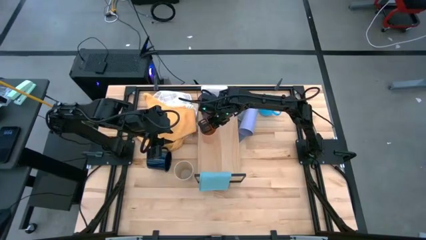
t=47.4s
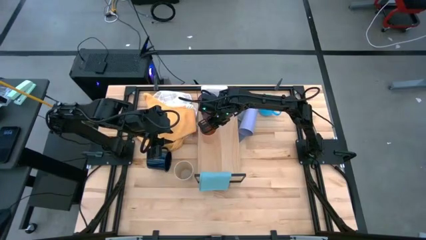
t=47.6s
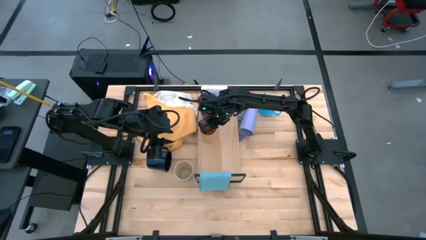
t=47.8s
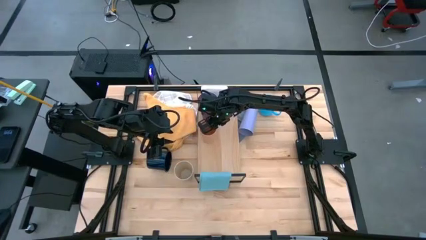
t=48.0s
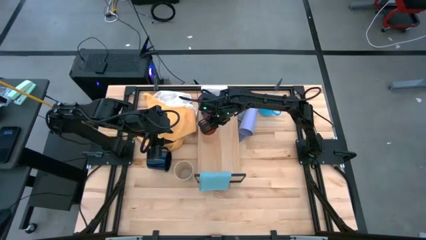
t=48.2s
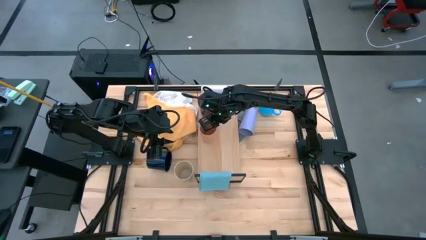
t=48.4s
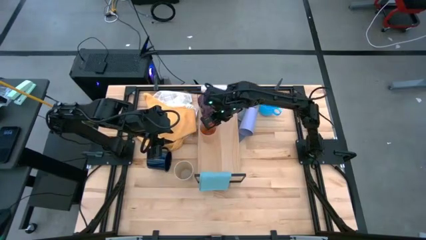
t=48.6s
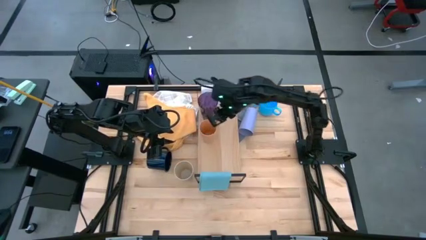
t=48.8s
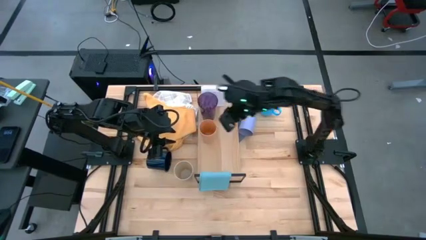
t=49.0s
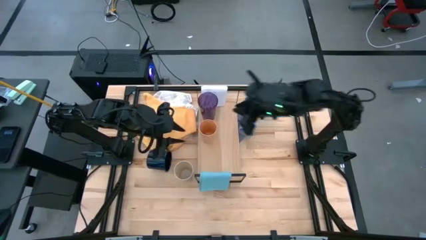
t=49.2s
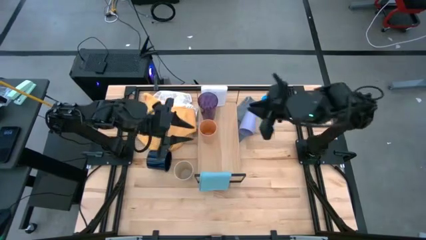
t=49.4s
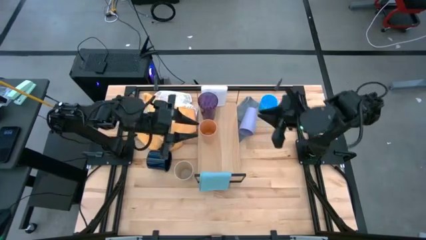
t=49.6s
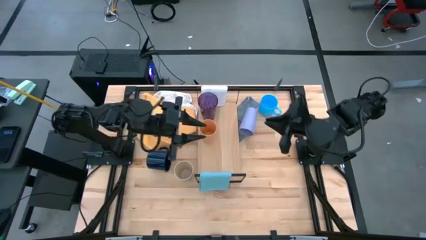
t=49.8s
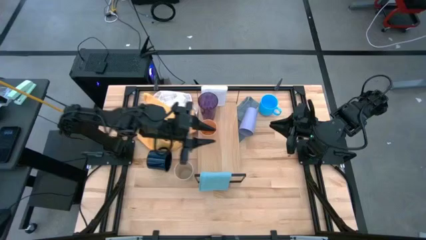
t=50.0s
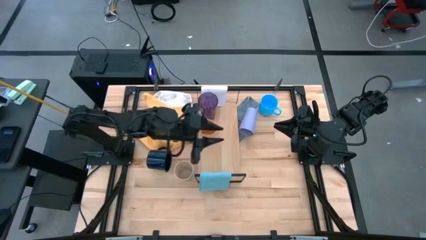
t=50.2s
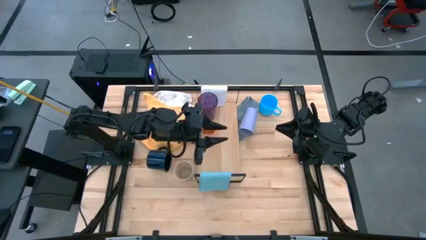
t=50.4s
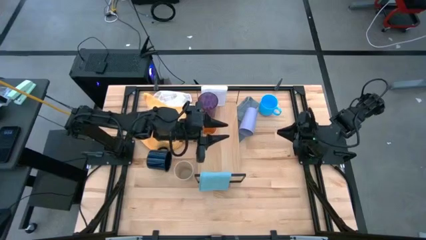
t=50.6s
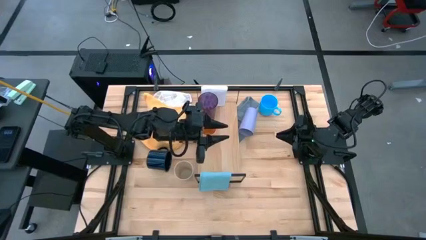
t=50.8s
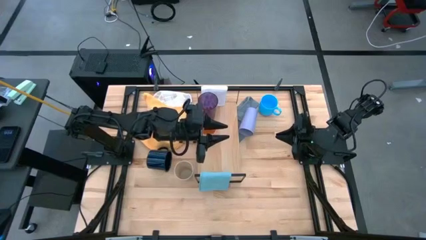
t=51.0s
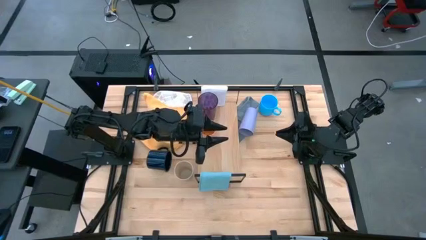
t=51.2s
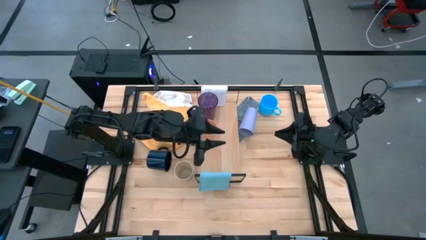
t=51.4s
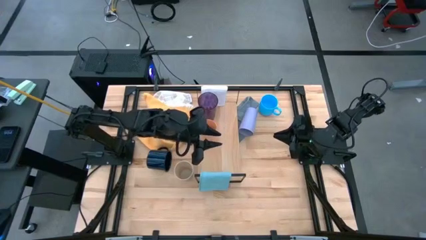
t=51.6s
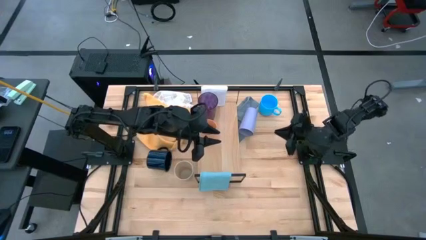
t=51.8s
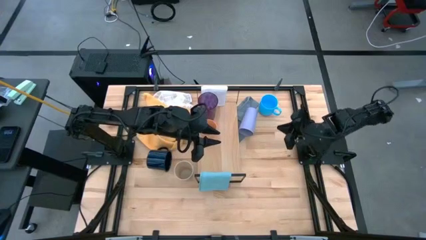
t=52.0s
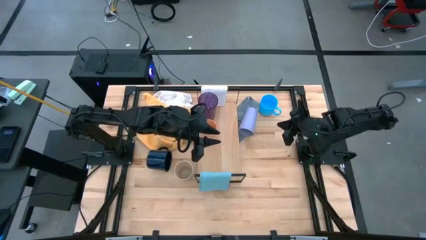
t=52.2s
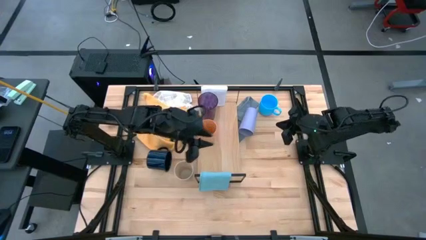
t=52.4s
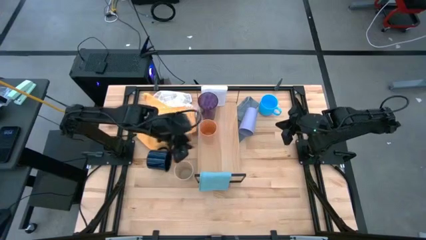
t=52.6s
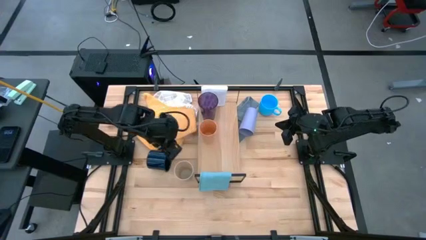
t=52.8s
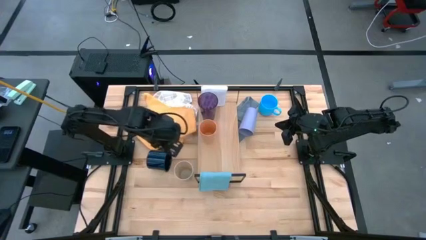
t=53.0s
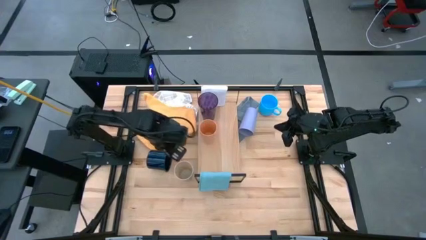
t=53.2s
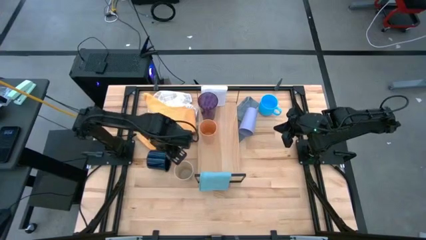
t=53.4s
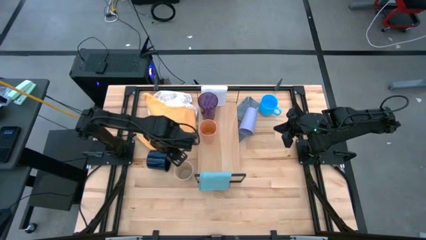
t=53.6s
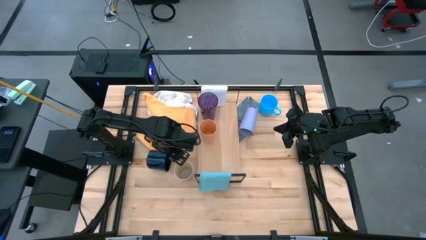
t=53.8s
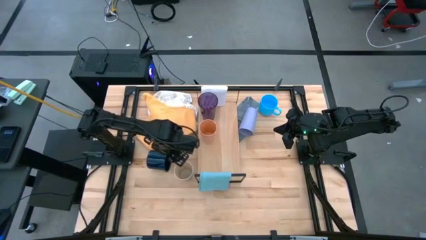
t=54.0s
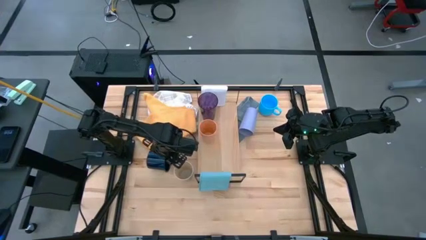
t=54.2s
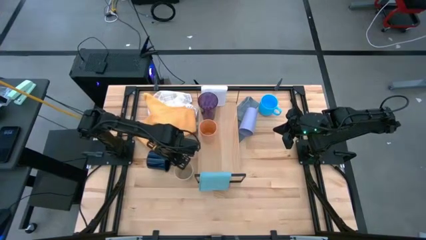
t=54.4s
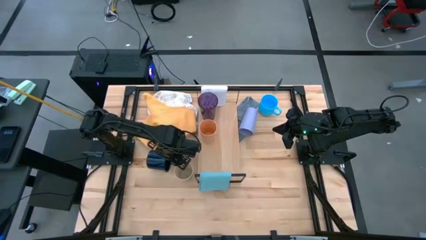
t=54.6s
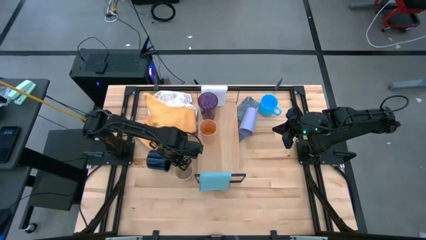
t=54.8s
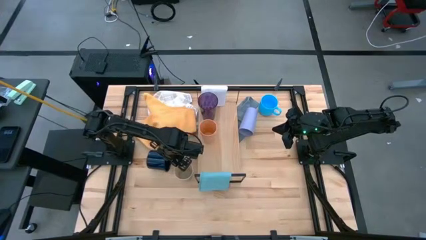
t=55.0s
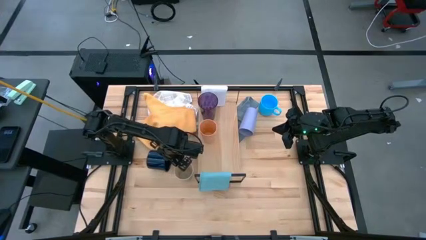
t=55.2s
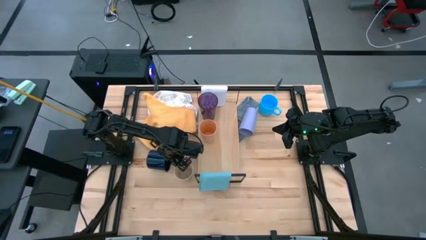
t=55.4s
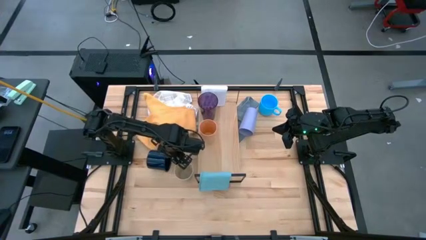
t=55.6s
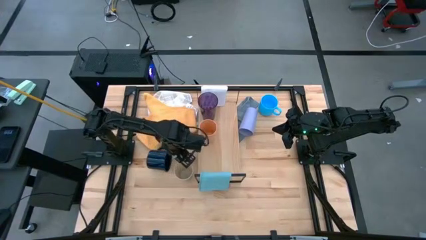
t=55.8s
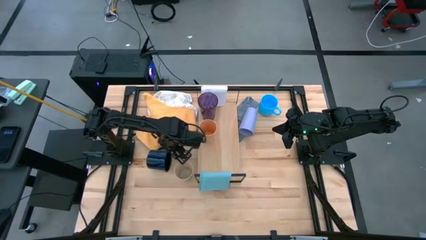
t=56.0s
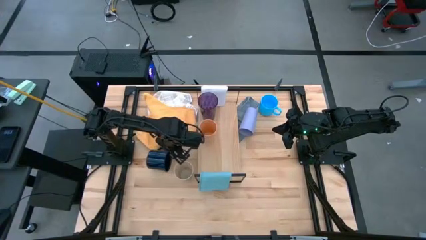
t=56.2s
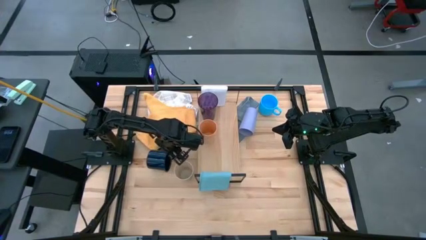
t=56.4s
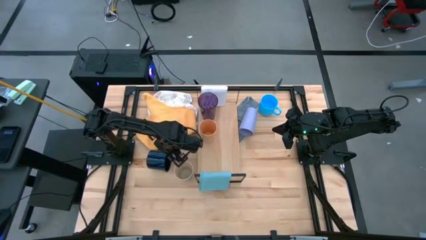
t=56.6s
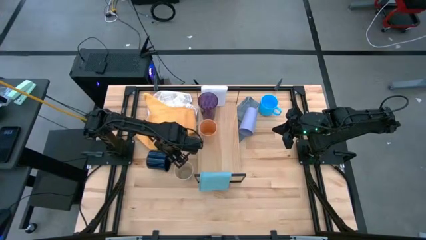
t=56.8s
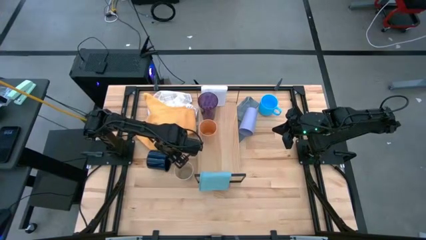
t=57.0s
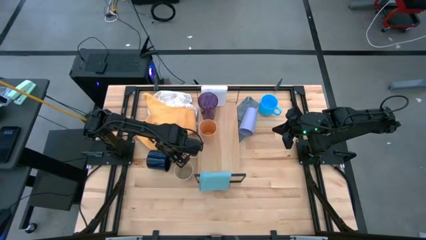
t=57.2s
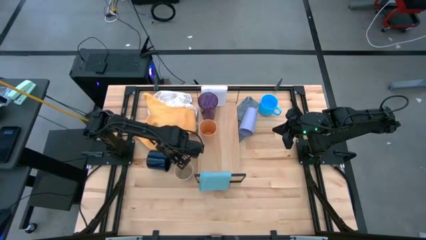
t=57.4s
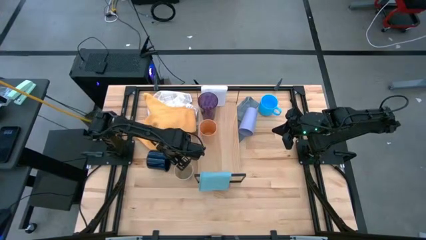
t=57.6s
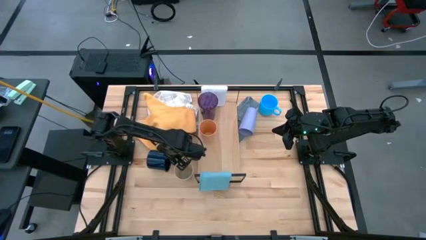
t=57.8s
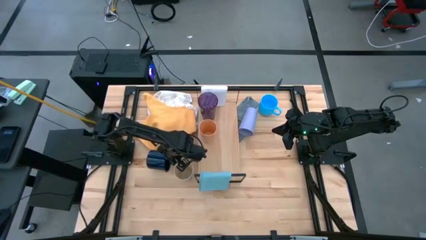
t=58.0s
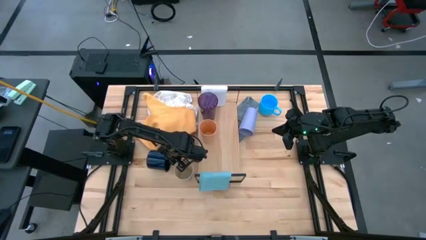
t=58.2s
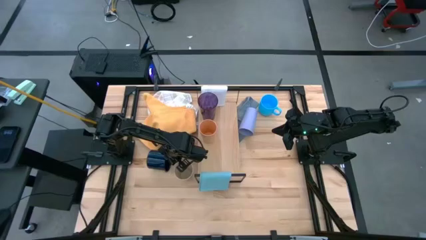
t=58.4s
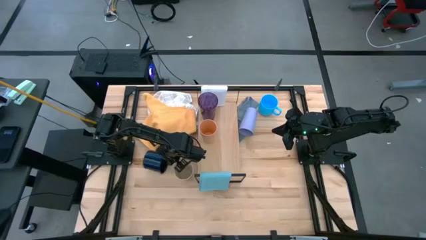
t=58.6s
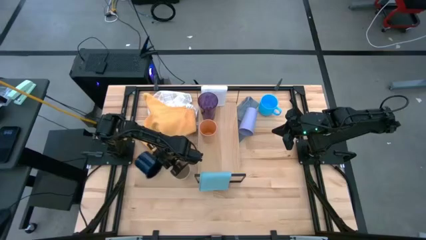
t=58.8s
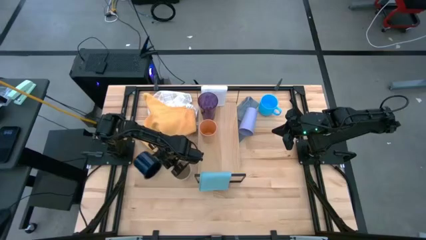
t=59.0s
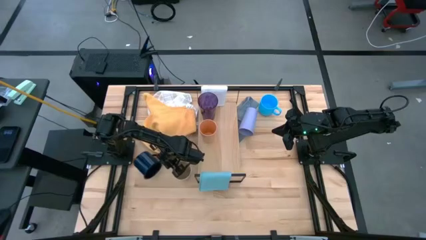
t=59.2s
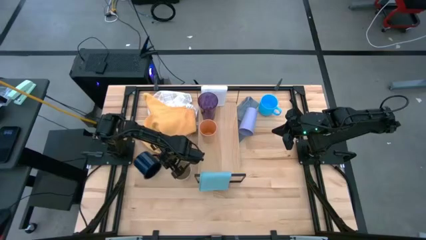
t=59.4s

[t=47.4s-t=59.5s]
Task: Stack small to large cups/mugs on shelf
Put the dark blue mug on the shelf
